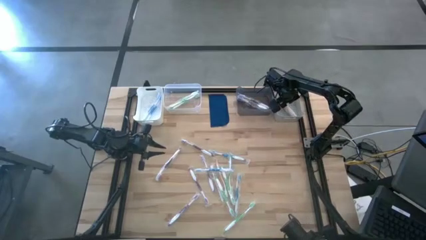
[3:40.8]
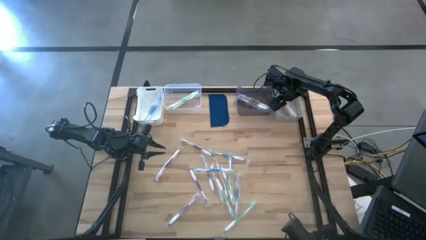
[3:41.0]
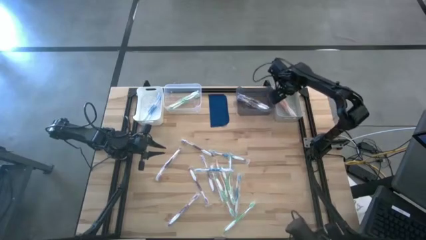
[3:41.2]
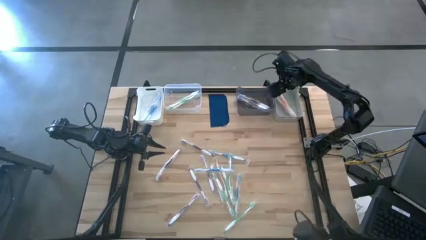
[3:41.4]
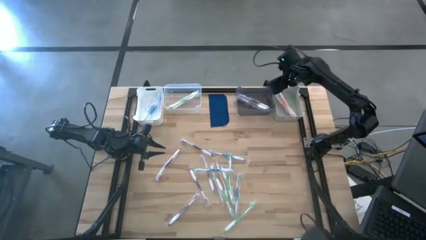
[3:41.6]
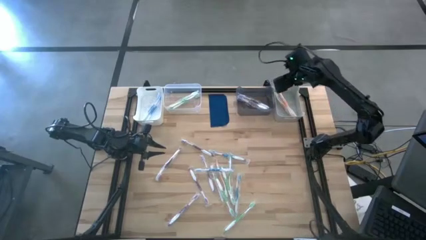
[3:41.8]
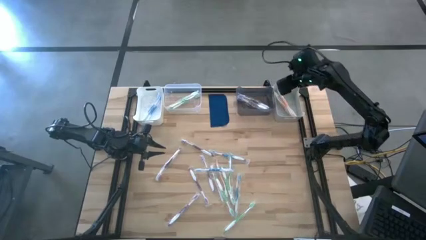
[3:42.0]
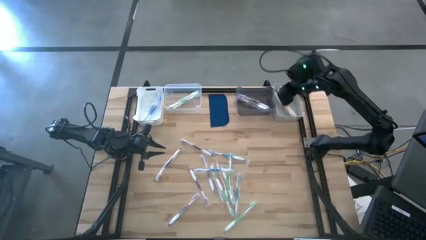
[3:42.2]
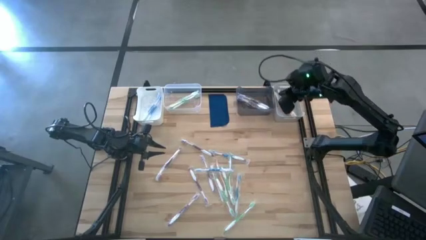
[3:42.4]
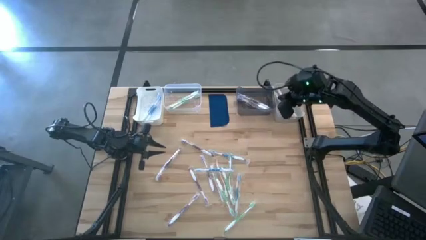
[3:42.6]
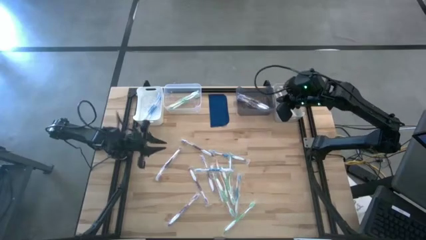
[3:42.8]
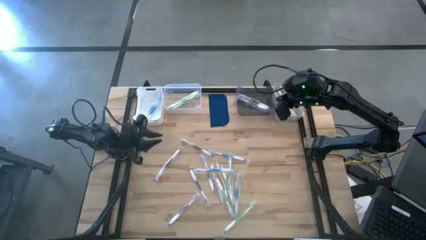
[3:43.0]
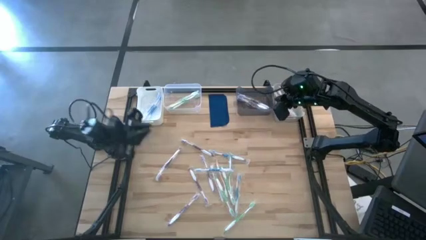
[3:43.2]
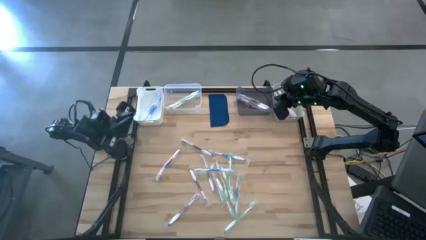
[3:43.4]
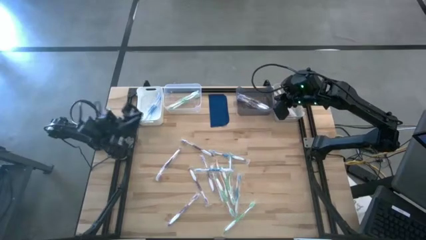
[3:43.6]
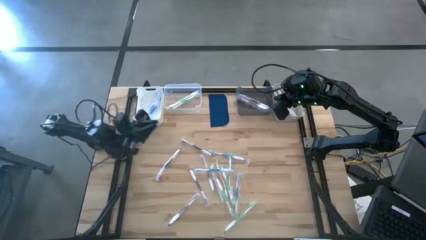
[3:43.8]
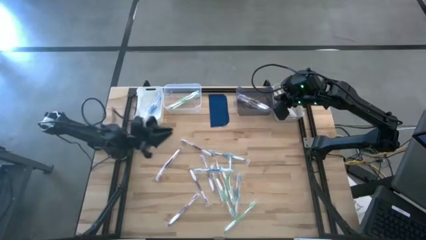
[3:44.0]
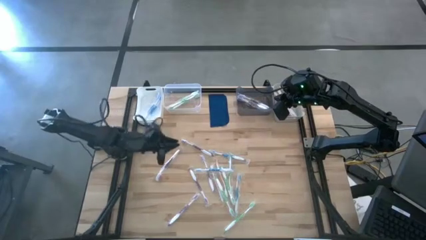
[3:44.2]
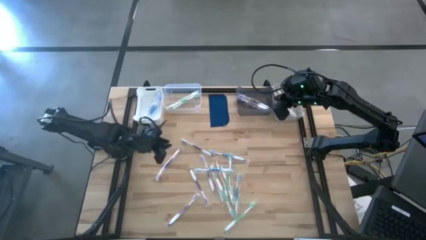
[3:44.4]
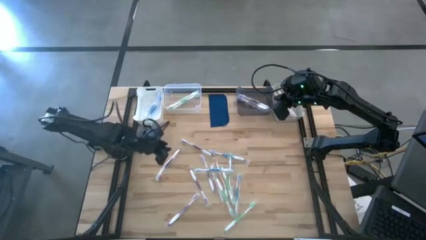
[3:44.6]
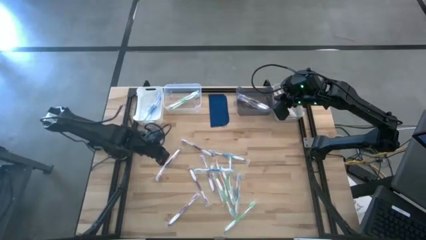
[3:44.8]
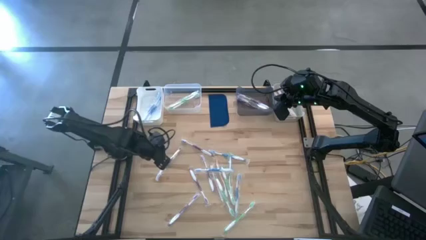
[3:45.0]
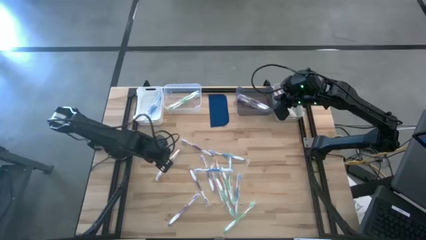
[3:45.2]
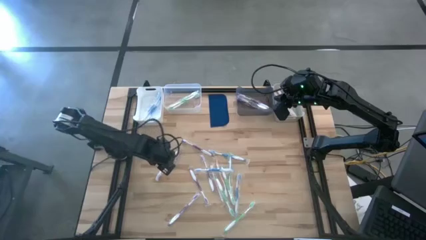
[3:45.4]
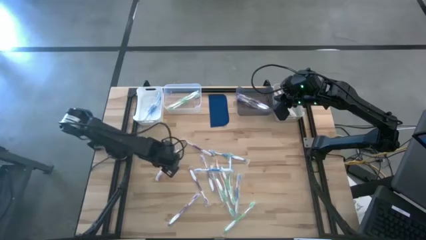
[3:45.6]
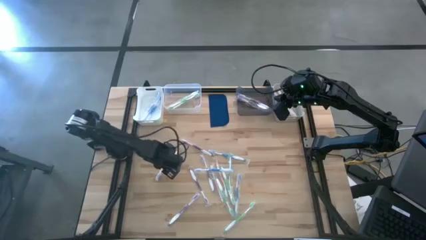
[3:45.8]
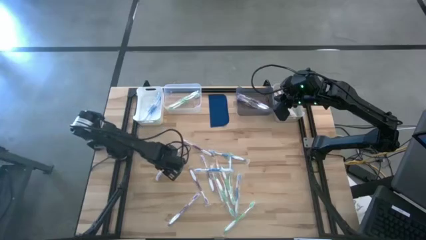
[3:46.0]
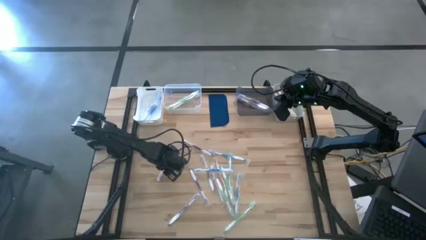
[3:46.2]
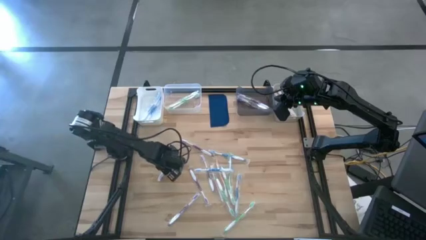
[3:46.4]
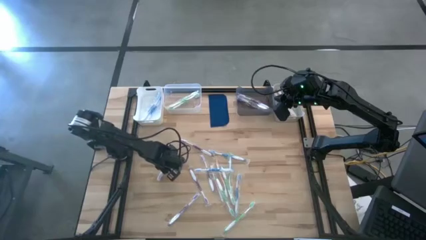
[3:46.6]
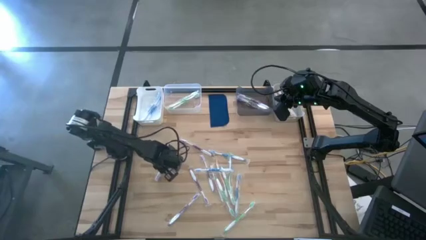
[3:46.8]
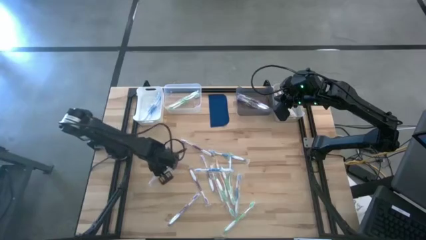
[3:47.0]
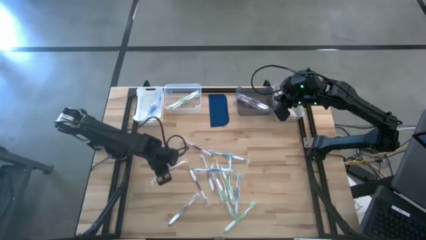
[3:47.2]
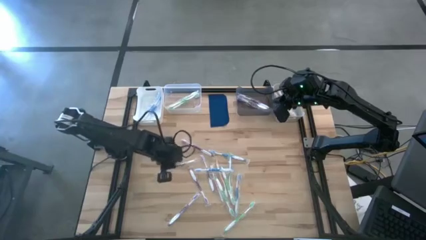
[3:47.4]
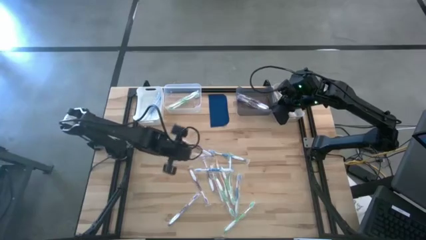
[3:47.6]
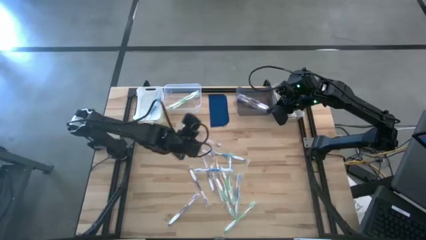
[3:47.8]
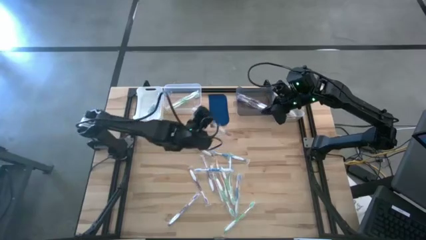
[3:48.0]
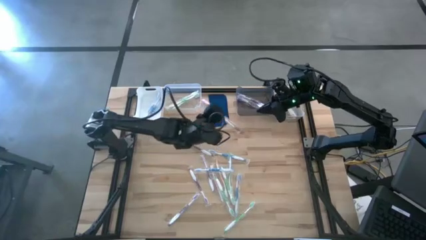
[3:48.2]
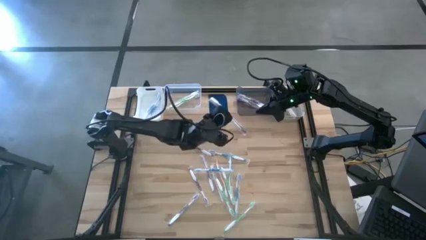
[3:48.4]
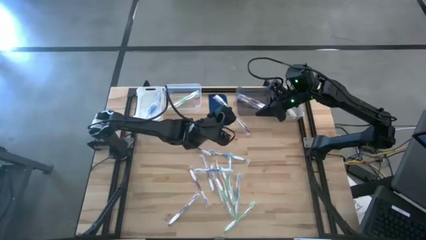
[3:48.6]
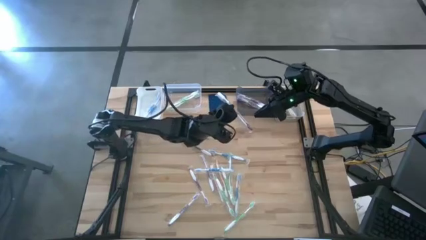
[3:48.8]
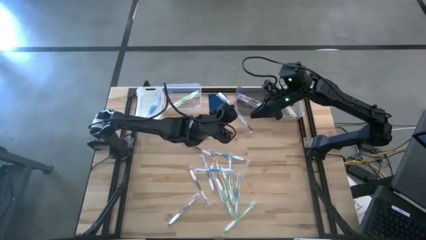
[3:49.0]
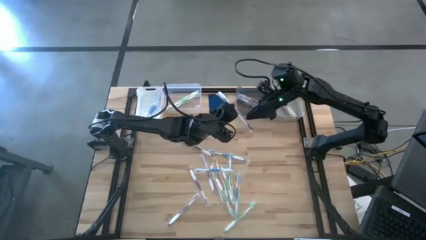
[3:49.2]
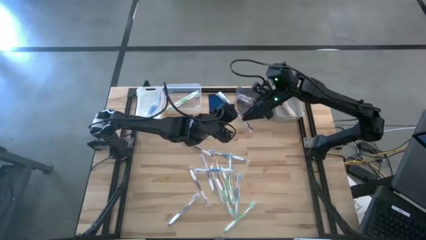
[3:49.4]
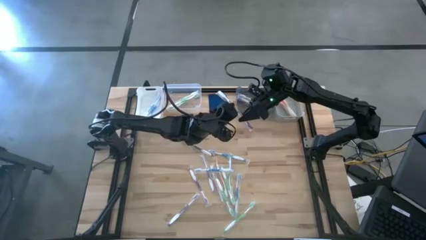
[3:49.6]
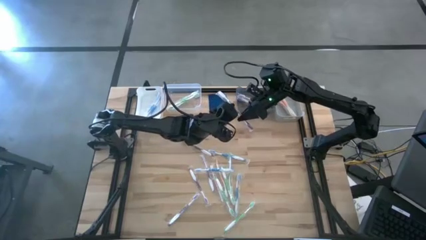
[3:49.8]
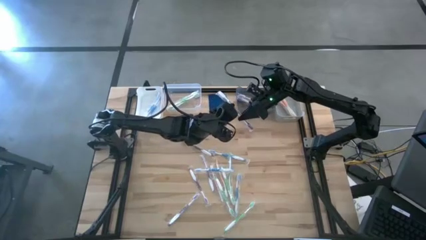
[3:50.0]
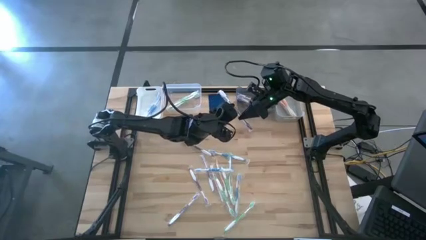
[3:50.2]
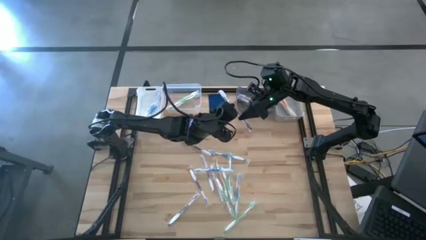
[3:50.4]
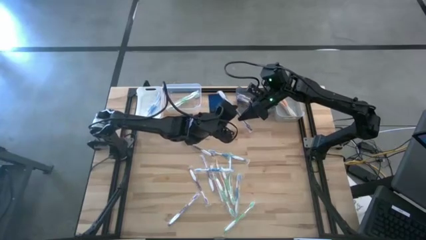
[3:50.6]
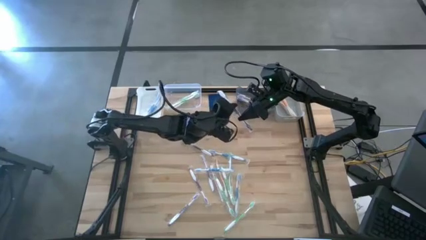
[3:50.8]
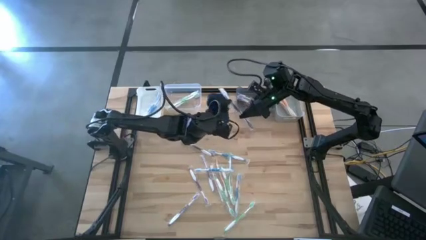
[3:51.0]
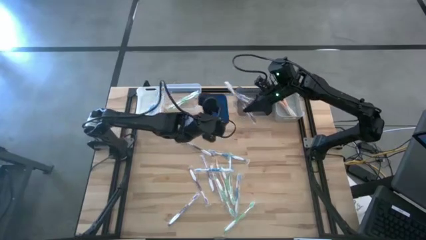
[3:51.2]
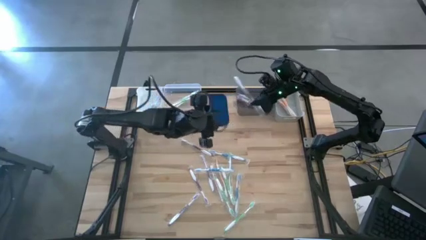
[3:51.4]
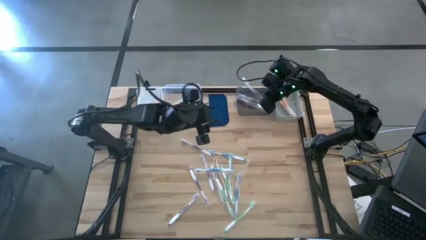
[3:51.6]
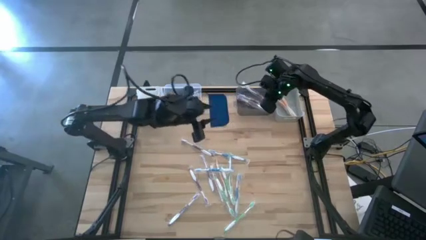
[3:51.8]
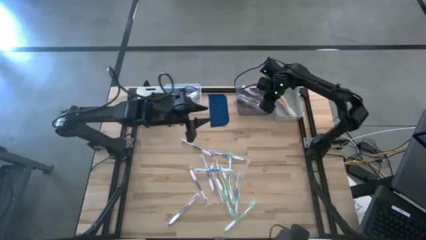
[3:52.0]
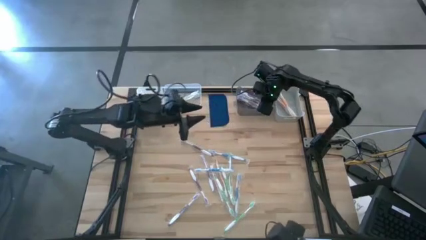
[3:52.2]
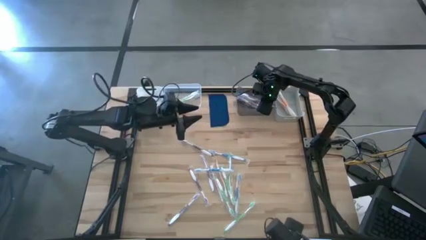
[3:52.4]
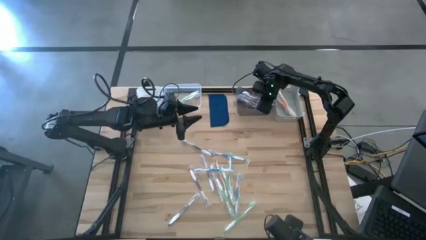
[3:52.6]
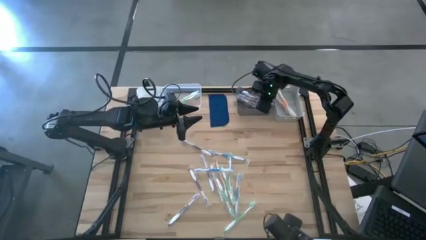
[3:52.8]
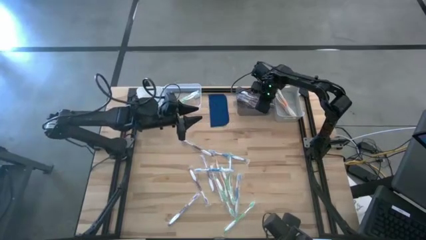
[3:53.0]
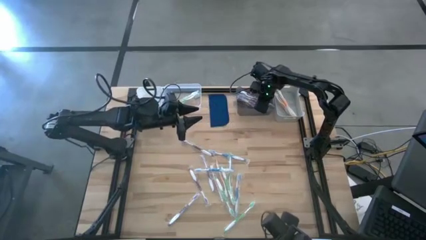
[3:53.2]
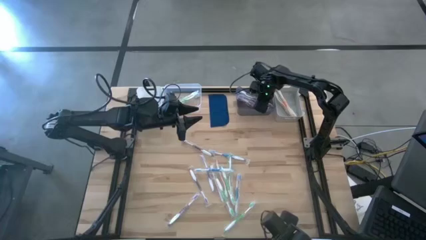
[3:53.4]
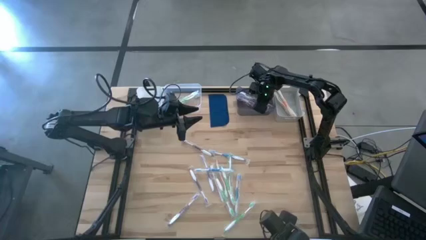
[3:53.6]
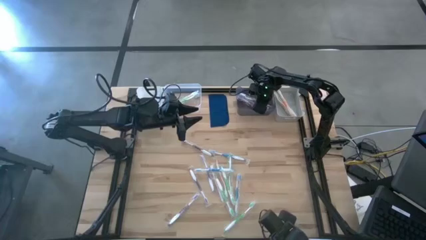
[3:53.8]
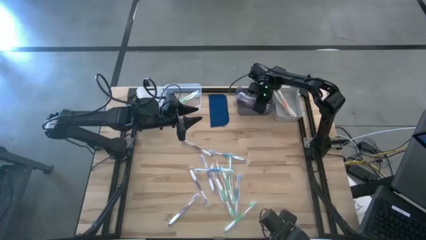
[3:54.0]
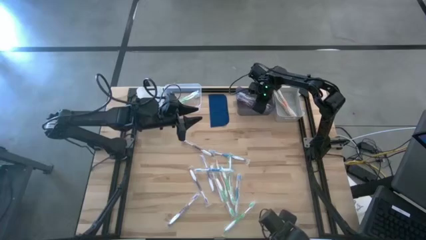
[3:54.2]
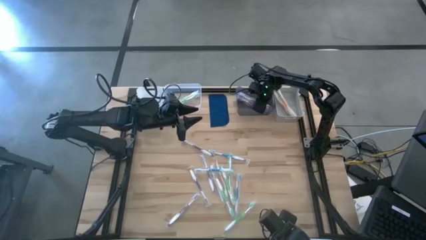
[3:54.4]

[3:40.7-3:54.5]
Task: Pick & Place Toothbrushes
Put the purple toothbrush into the black bin

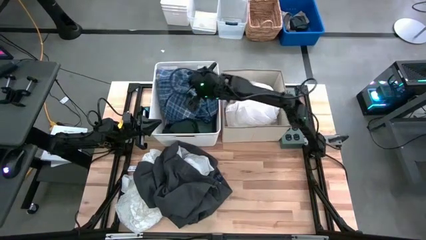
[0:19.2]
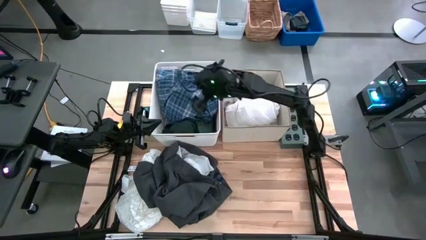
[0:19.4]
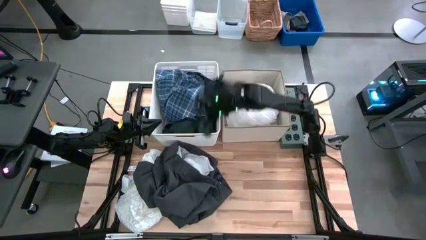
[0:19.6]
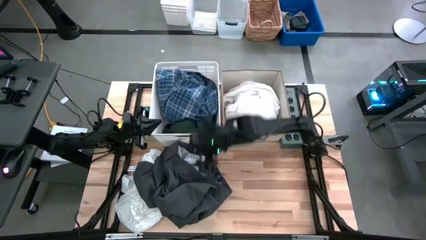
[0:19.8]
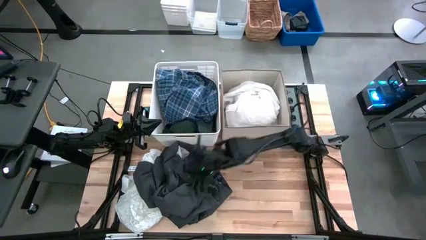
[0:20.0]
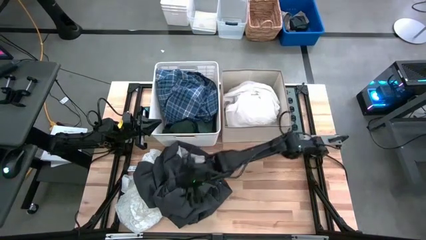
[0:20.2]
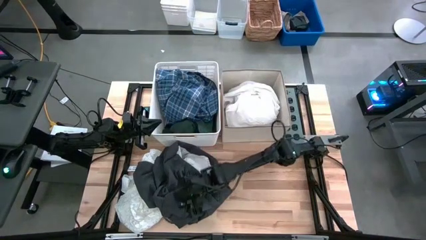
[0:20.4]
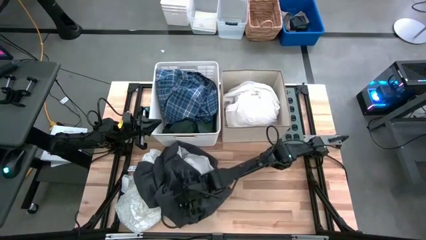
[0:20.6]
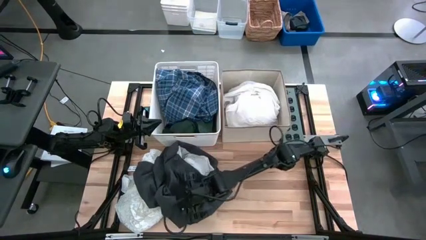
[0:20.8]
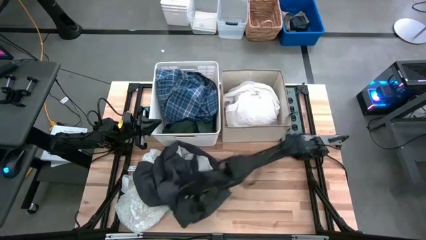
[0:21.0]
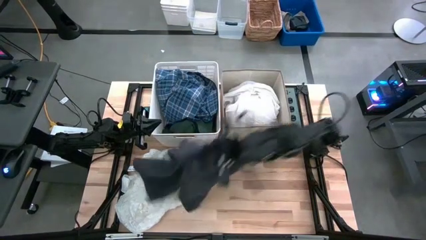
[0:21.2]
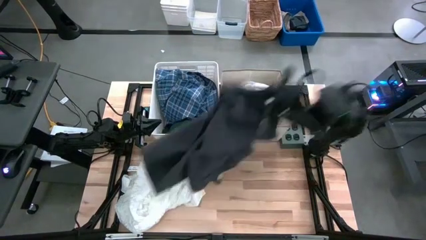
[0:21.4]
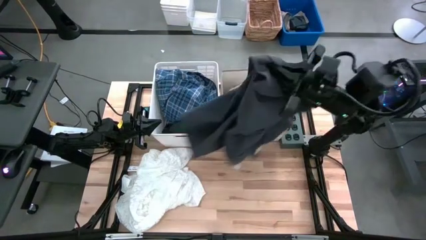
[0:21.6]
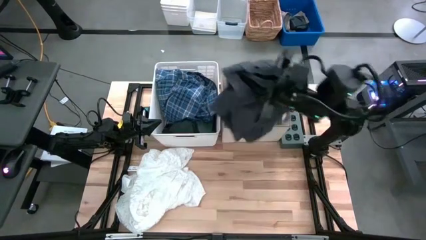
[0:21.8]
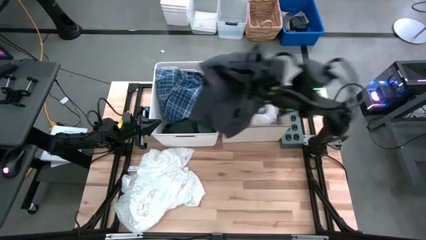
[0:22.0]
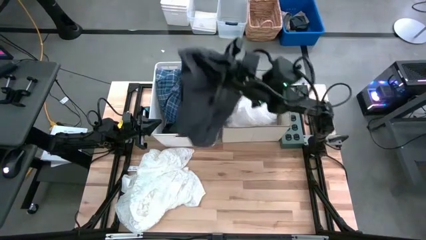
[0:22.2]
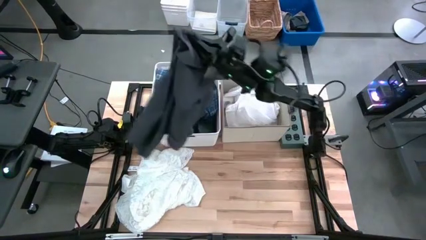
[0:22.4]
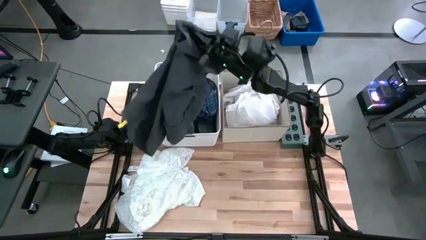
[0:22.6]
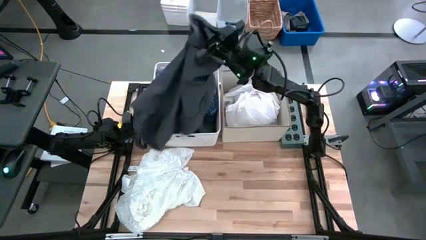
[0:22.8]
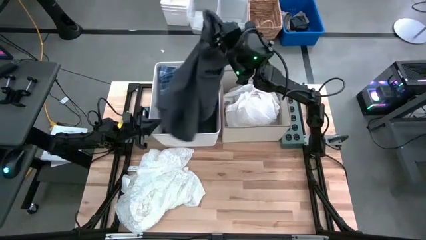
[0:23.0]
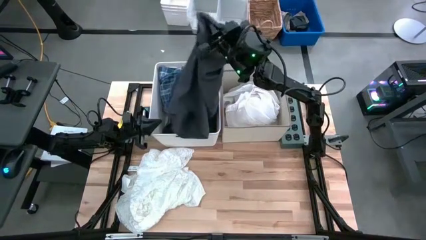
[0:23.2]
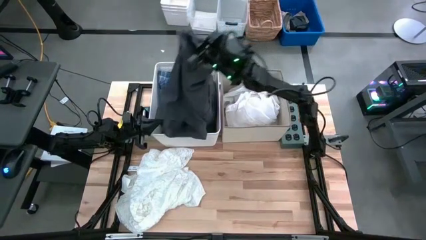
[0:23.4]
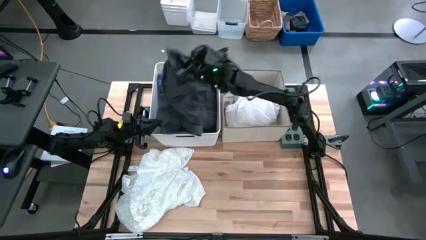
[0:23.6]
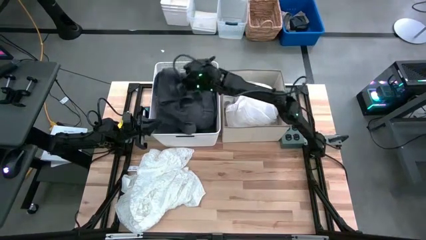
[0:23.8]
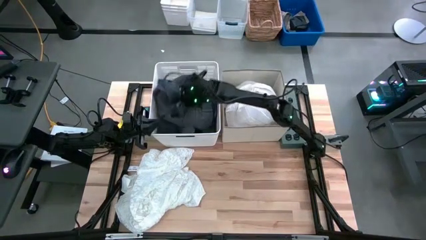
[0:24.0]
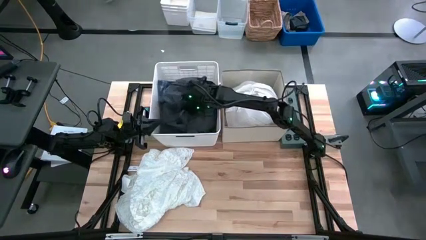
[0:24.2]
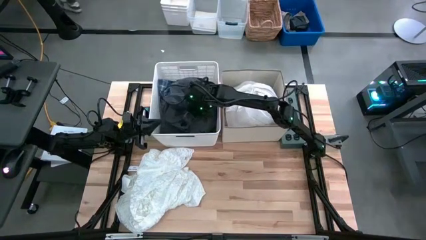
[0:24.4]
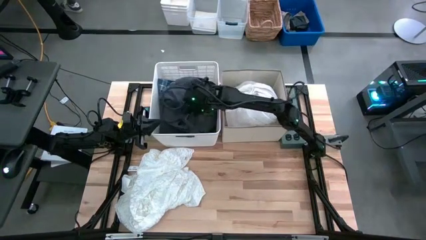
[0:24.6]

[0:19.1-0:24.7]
Task: Sort clothes
Put the black shorts into the white bin
